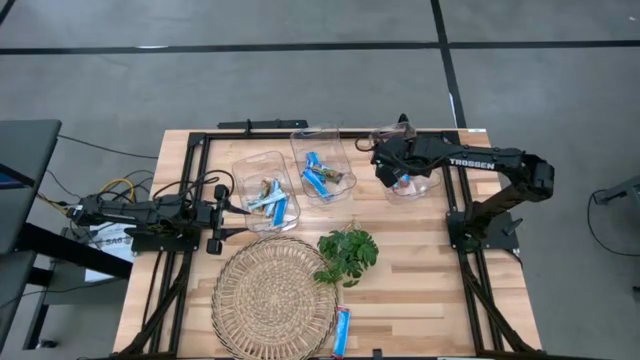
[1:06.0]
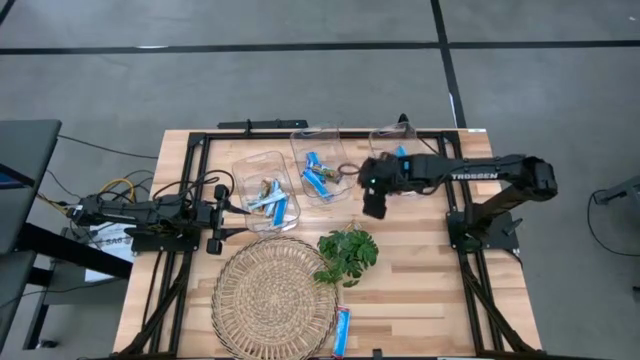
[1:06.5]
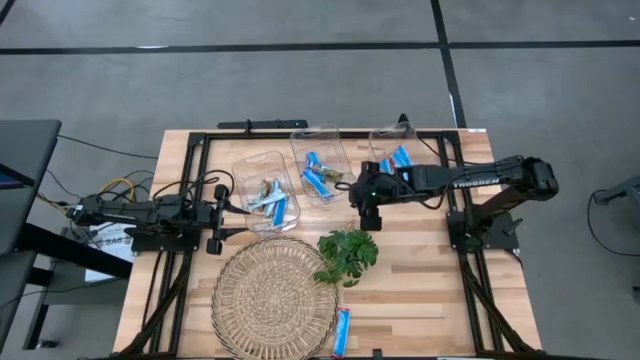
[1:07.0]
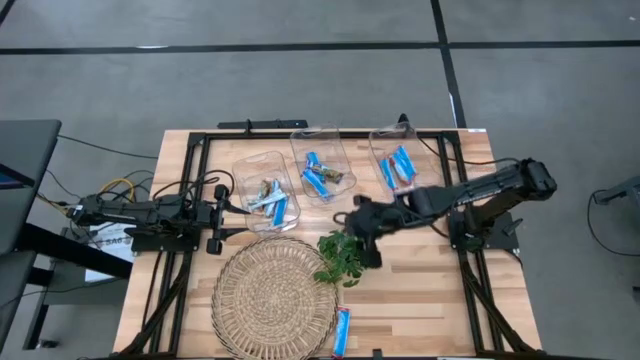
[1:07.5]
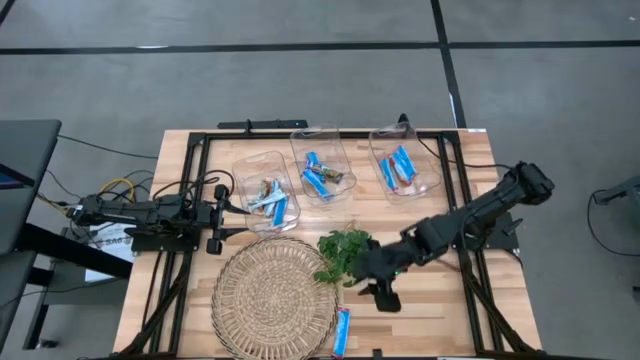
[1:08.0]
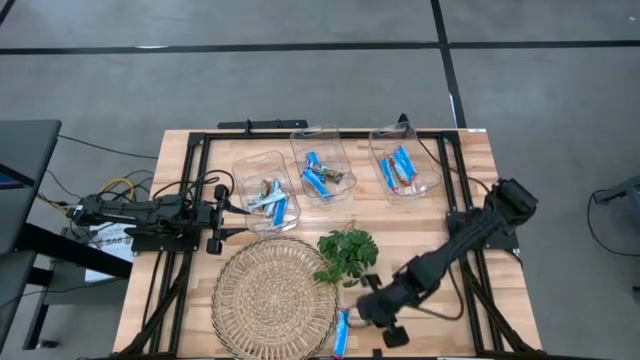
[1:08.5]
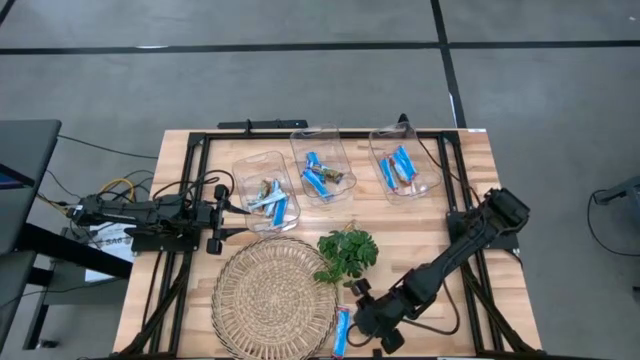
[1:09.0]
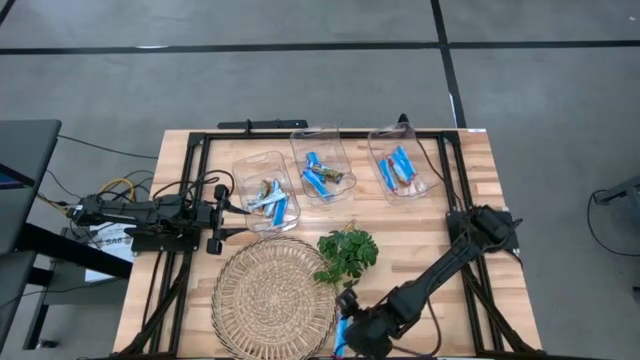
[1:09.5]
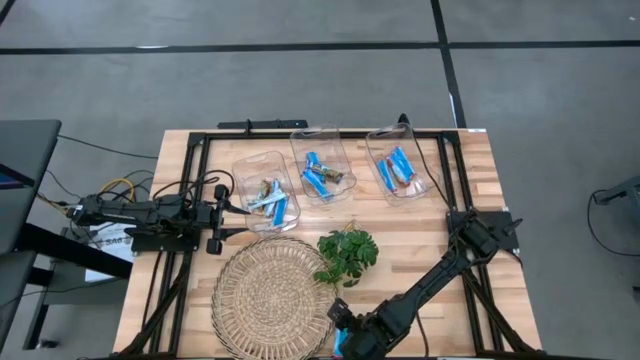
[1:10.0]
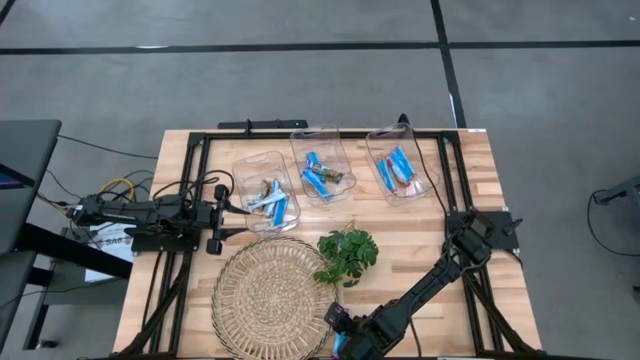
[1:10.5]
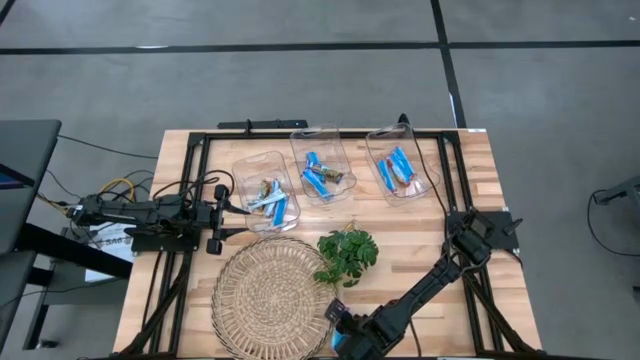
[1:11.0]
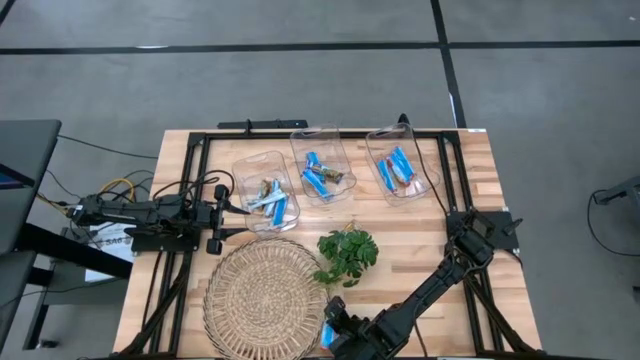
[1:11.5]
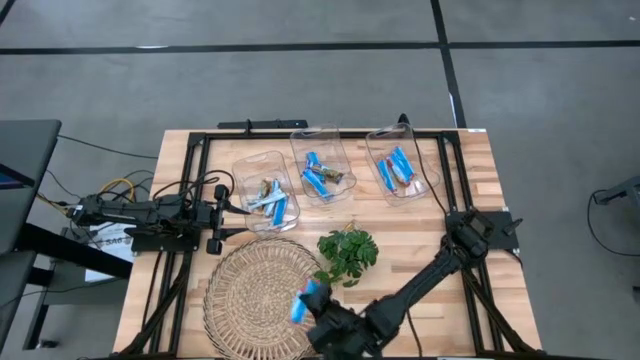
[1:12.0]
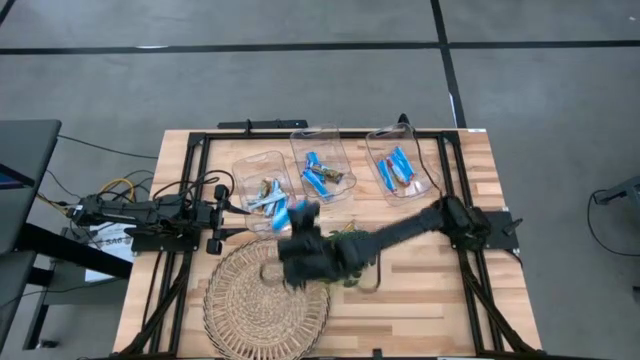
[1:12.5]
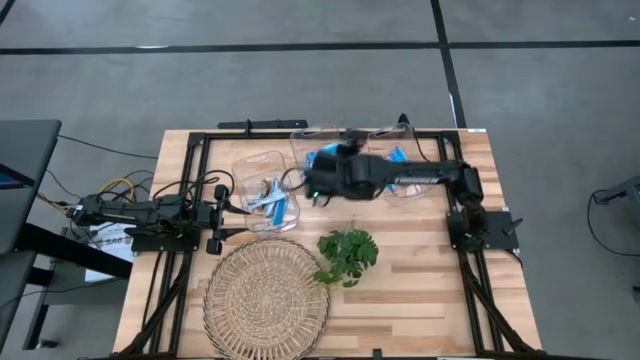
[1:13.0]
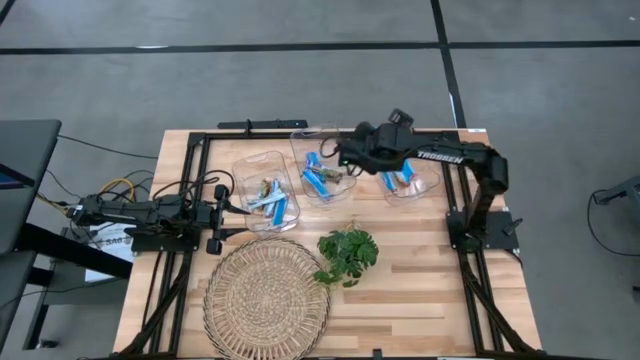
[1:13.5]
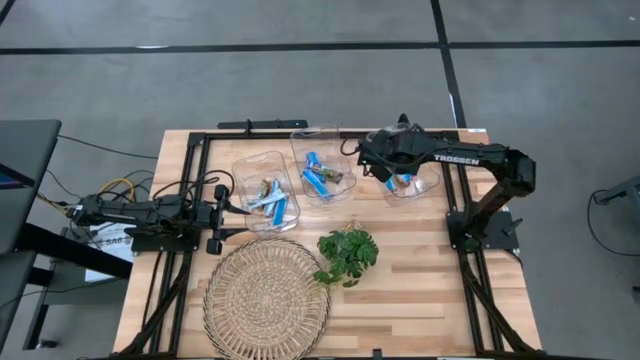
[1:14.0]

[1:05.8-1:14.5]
Task: Pick and place Granola Bars by type
Put the red granola bar into the right transparent bin

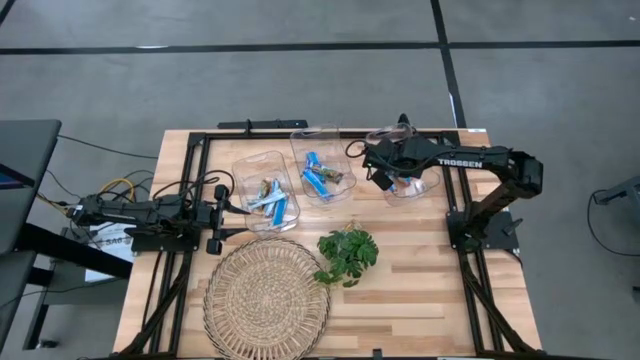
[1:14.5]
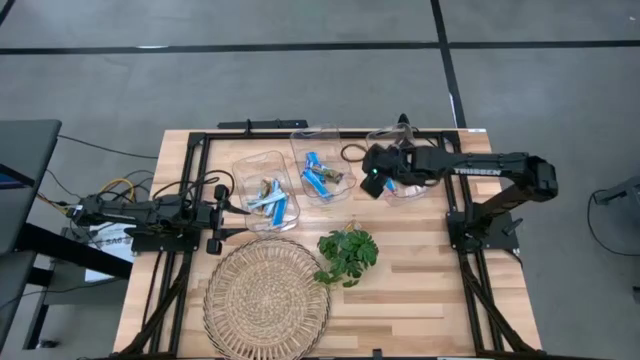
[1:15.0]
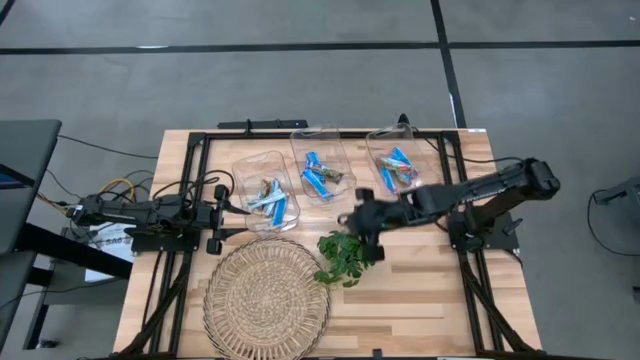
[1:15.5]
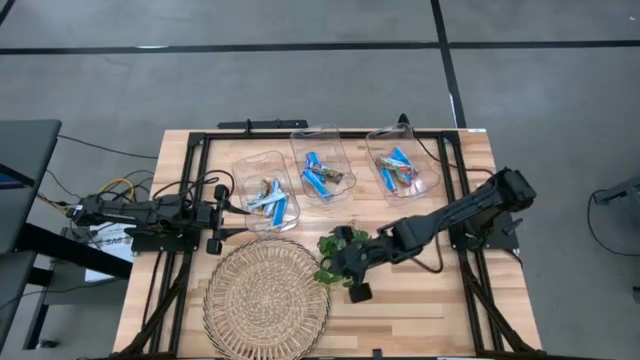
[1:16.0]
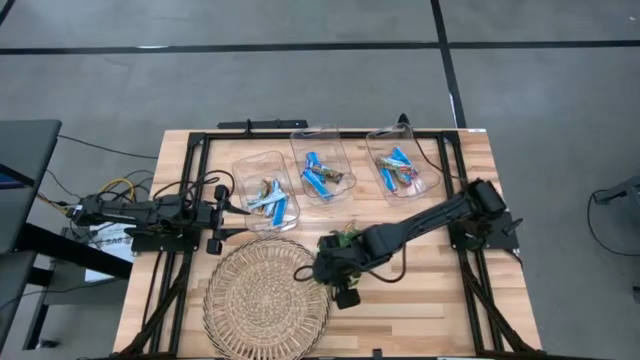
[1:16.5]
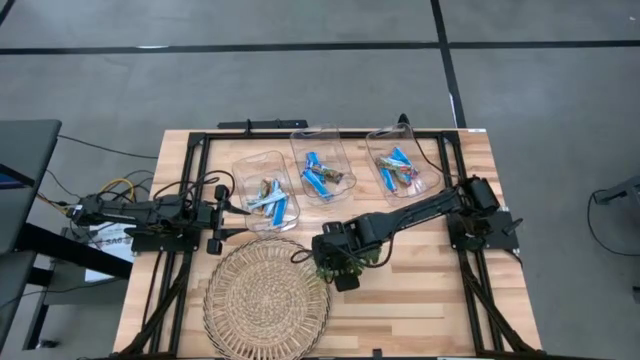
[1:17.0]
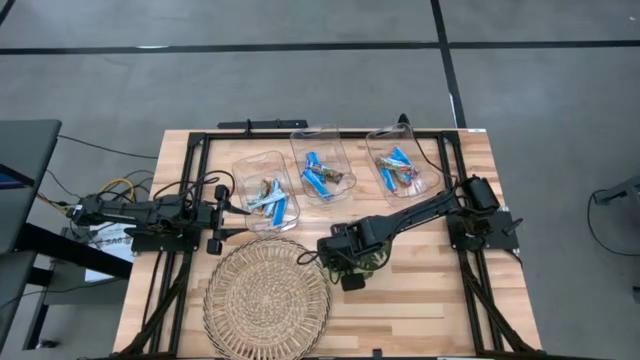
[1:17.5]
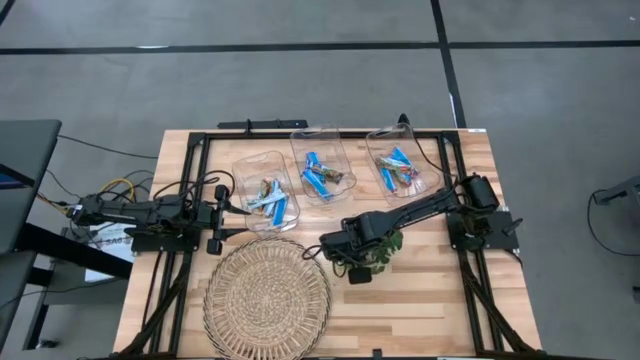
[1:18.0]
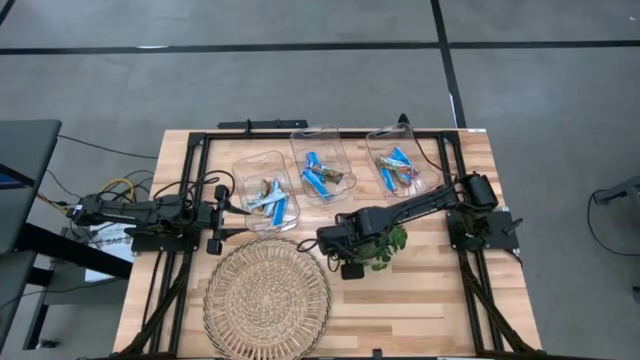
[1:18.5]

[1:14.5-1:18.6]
Adjust the potted plant

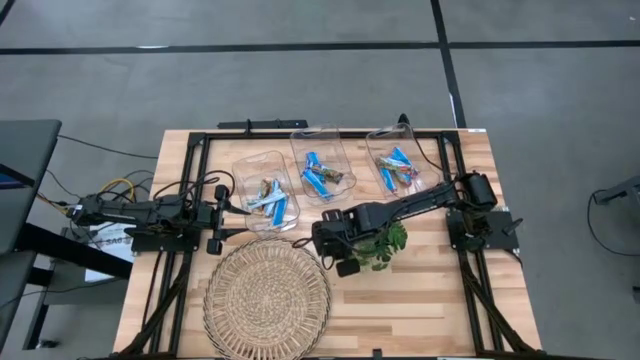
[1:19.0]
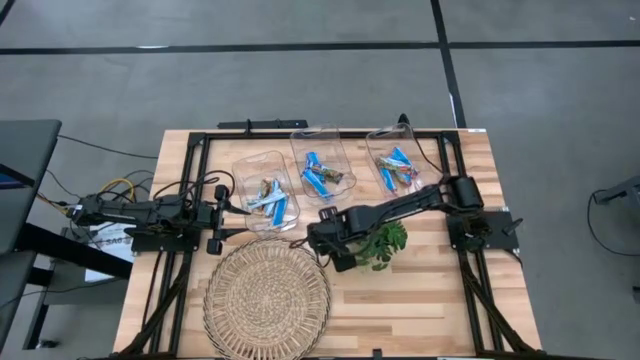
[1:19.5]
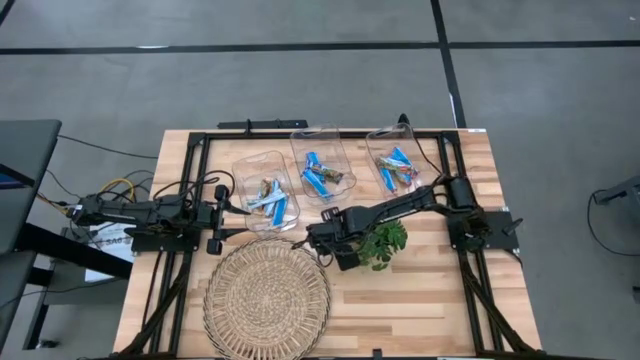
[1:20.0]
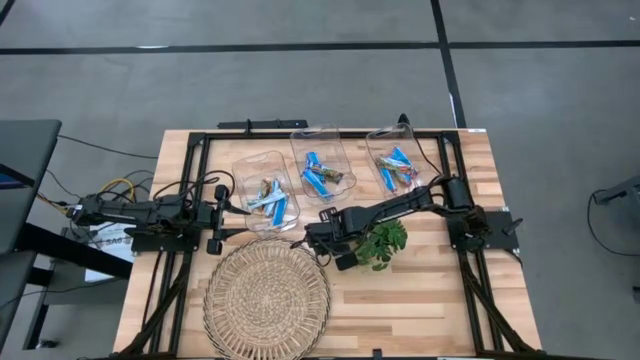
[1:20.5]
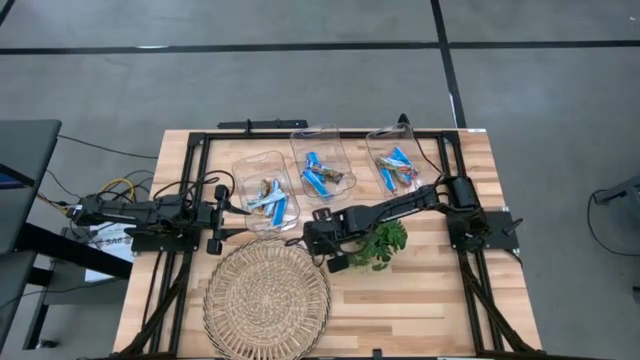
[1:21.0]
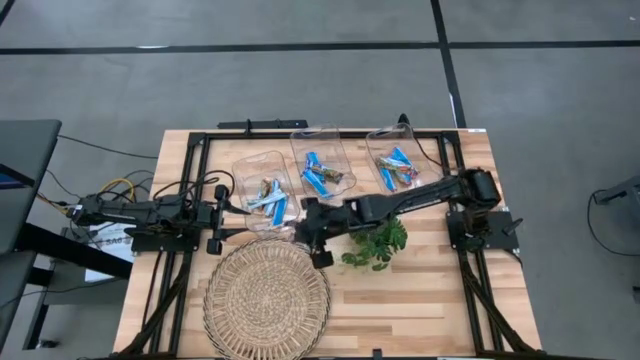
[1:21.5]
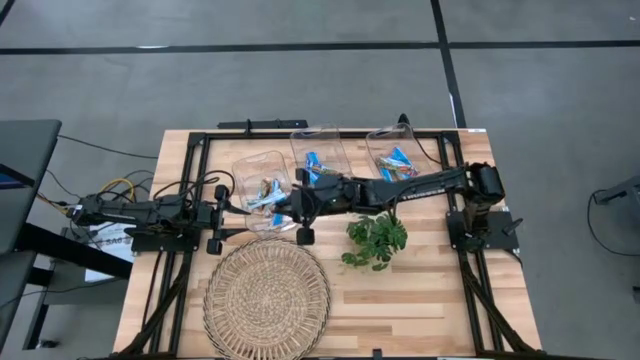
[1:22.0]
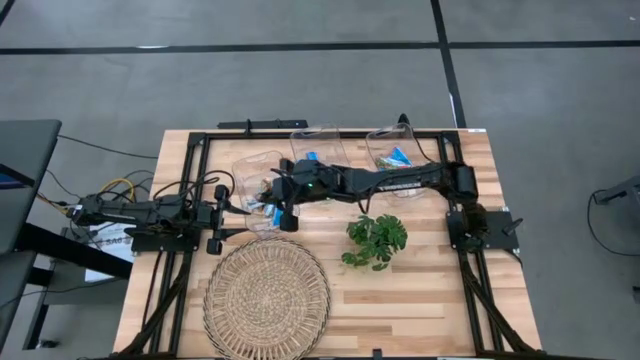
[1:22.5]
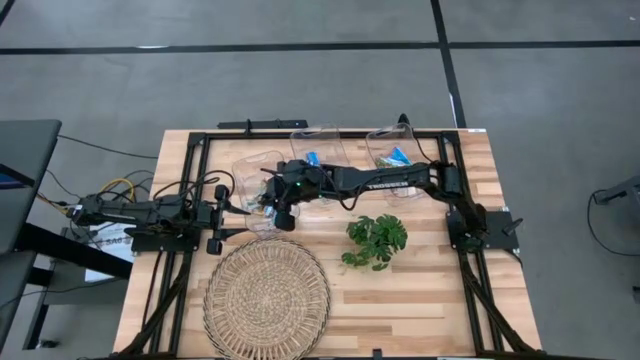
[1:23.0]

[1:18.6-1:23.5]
Put the yellow granola bar into the left transparent bin

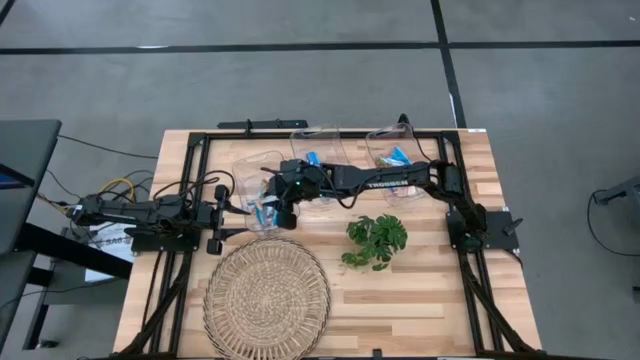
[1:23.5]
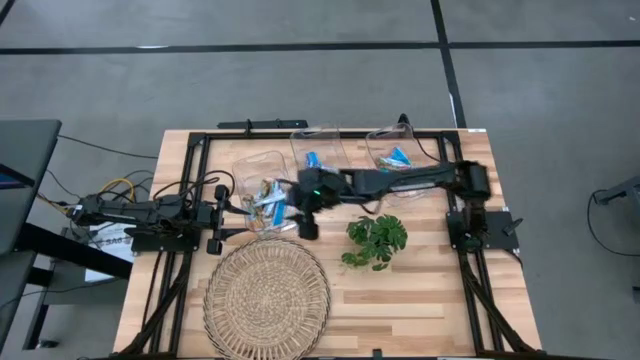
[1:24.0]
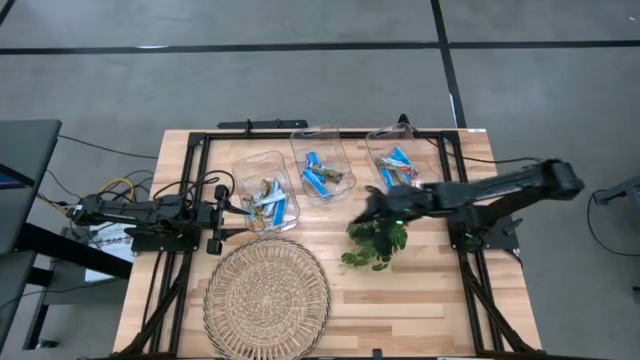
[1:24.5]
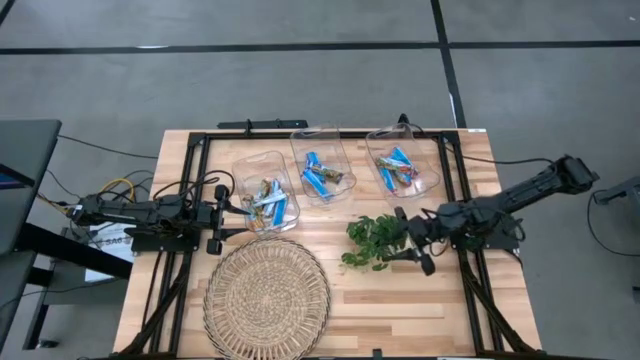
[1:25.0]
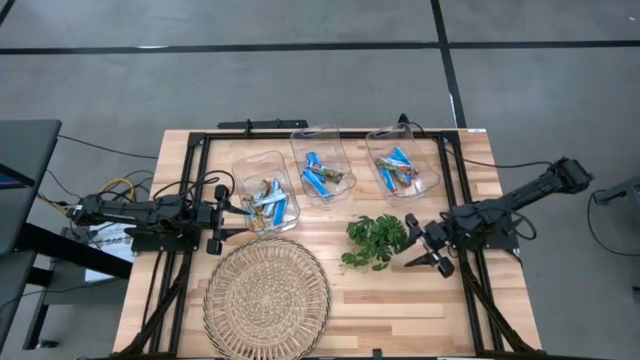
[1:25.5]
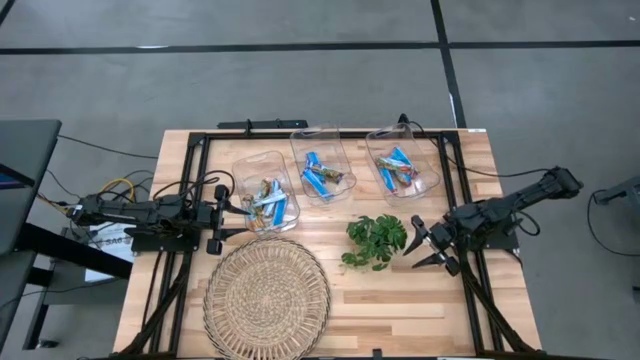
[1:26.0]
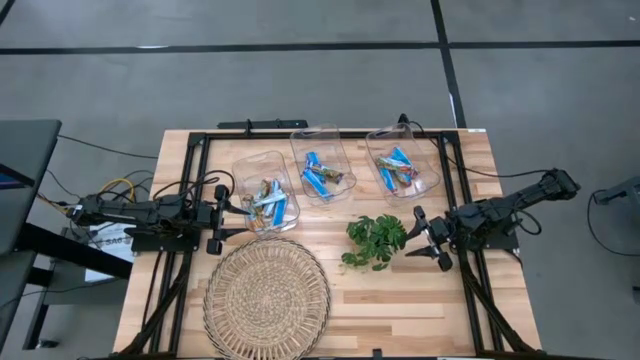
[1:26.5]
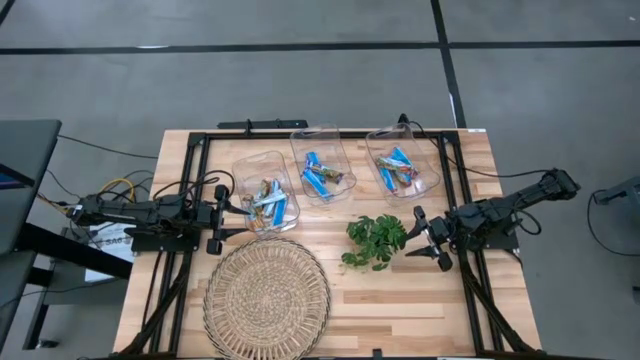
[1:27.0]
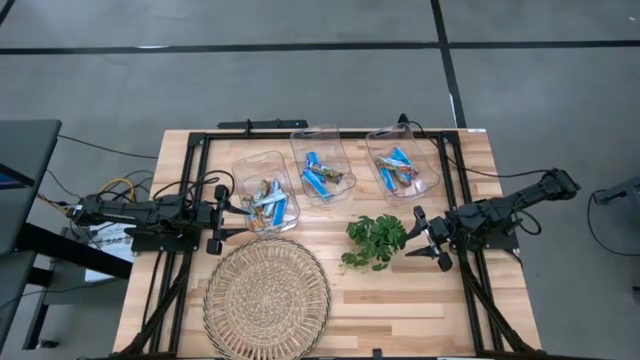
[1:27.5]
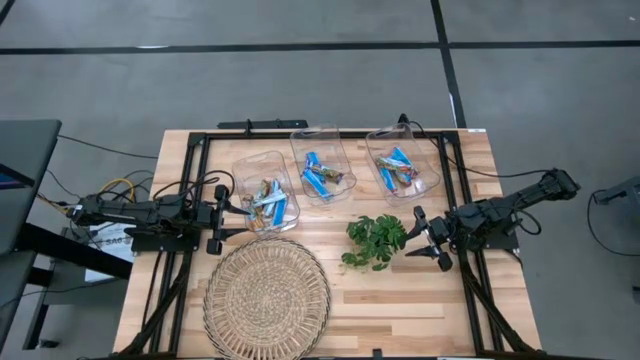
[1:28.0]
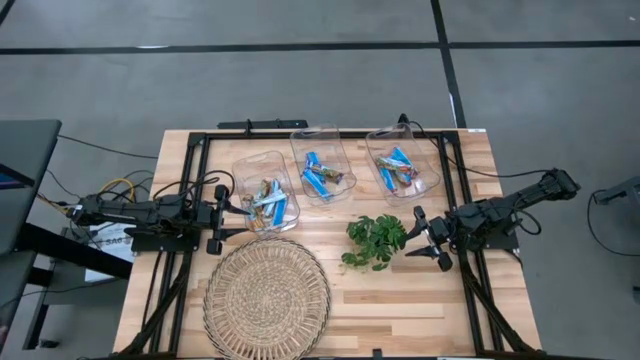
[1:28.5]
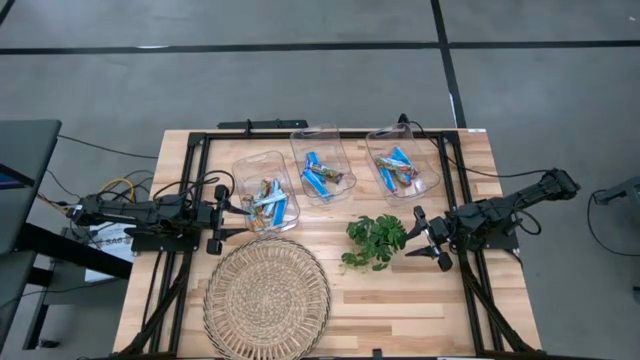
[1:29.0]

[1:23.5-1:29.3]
Return to Home Position
